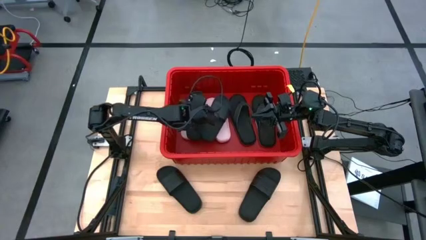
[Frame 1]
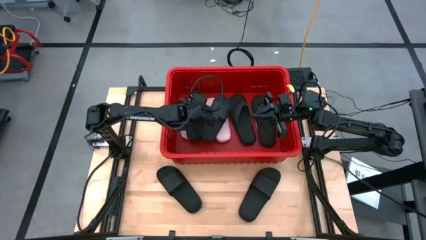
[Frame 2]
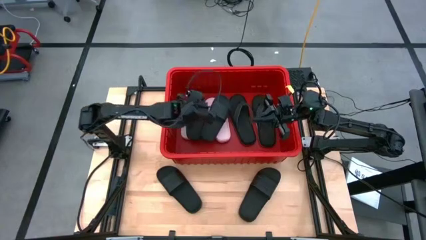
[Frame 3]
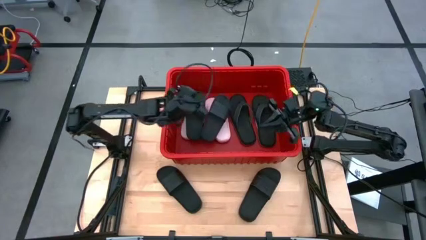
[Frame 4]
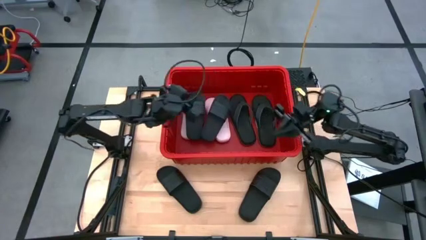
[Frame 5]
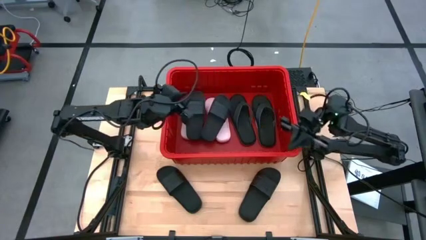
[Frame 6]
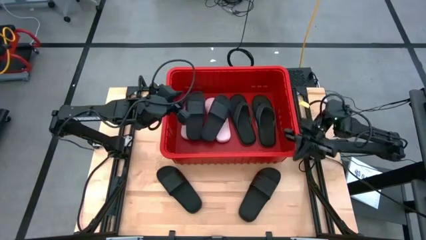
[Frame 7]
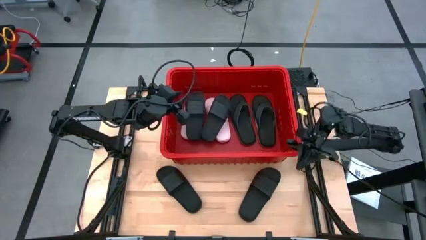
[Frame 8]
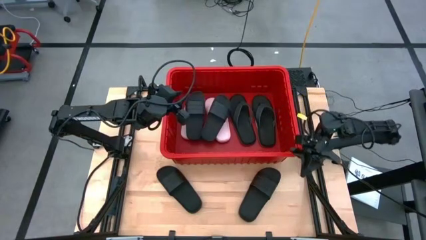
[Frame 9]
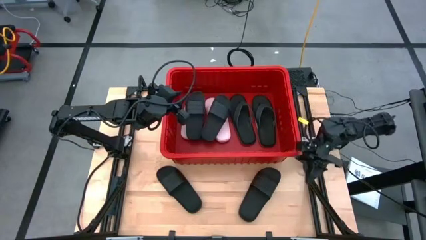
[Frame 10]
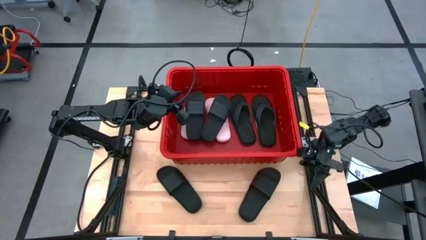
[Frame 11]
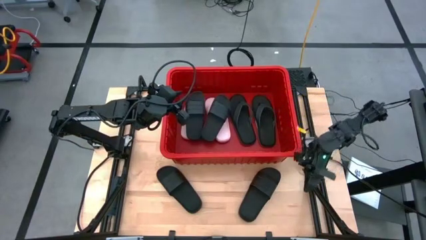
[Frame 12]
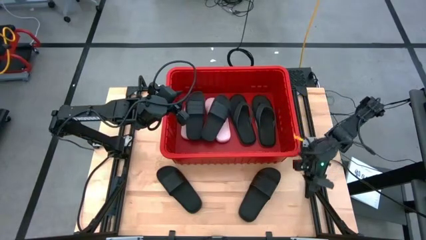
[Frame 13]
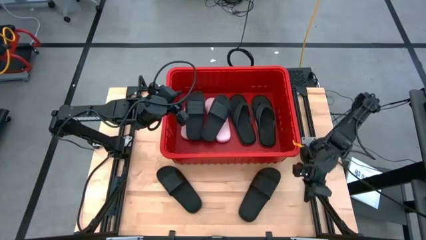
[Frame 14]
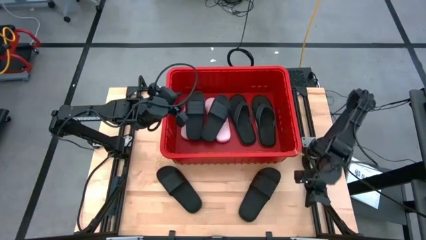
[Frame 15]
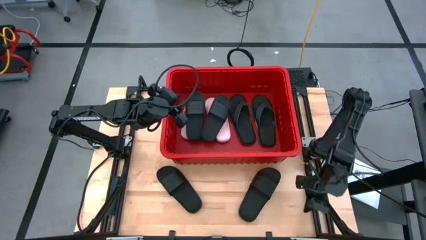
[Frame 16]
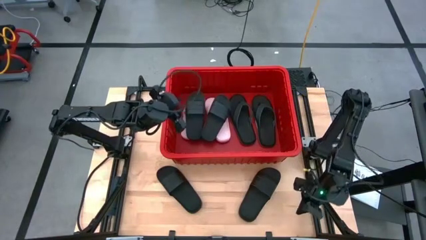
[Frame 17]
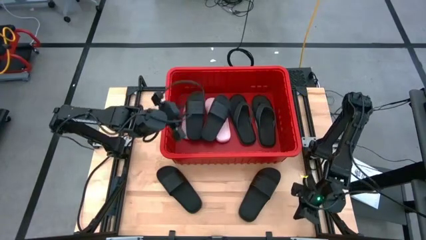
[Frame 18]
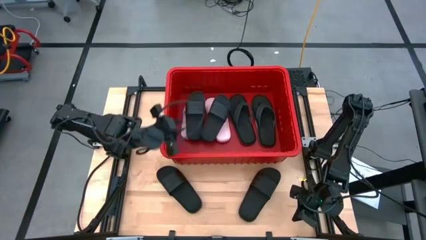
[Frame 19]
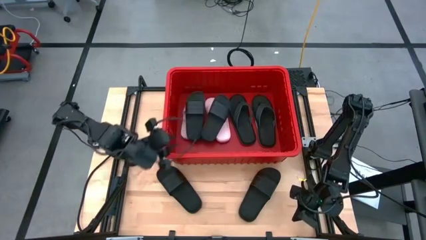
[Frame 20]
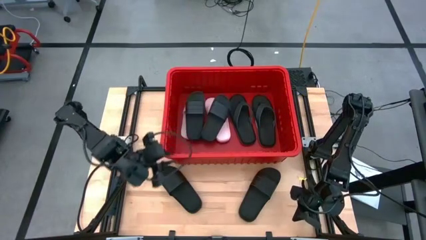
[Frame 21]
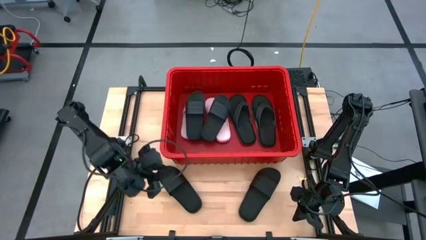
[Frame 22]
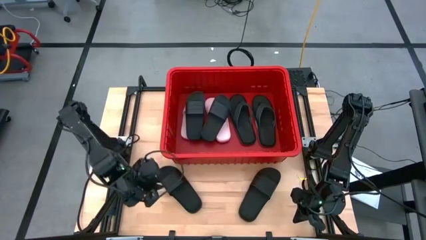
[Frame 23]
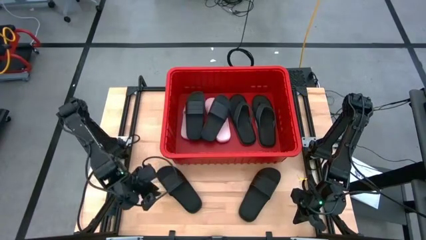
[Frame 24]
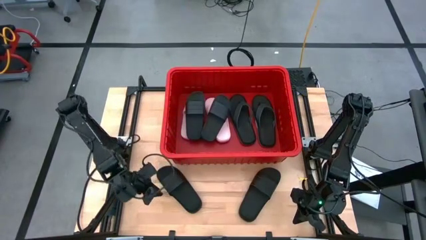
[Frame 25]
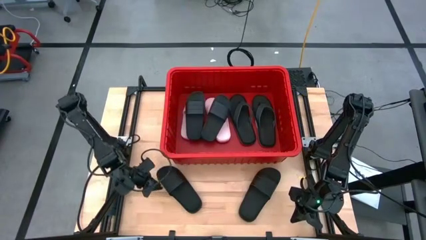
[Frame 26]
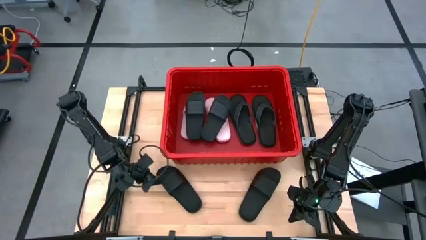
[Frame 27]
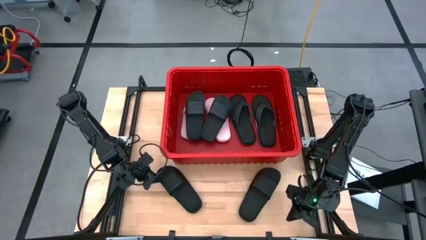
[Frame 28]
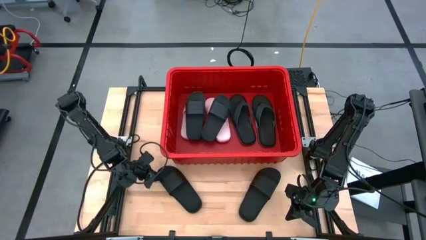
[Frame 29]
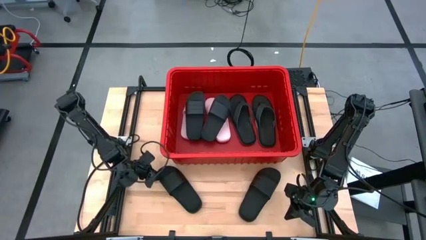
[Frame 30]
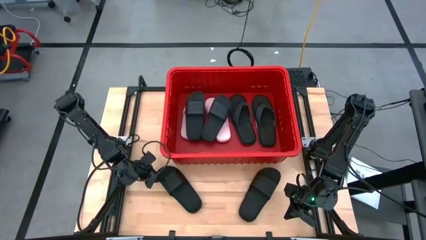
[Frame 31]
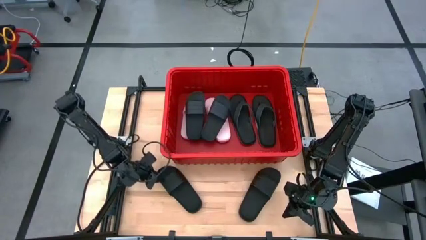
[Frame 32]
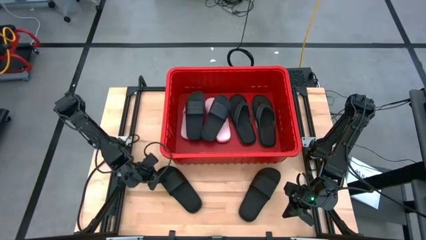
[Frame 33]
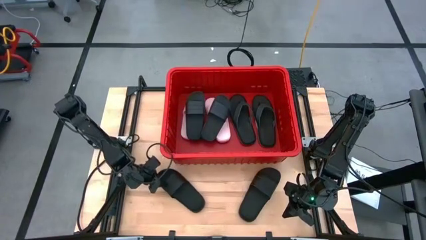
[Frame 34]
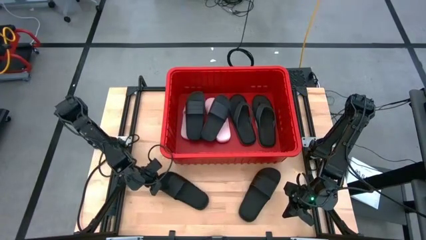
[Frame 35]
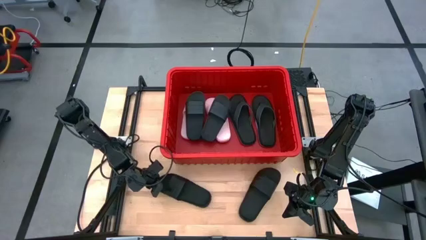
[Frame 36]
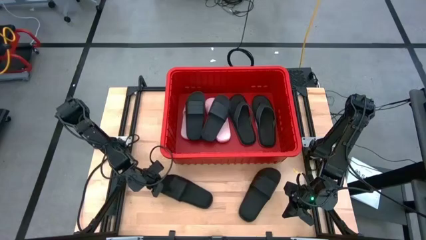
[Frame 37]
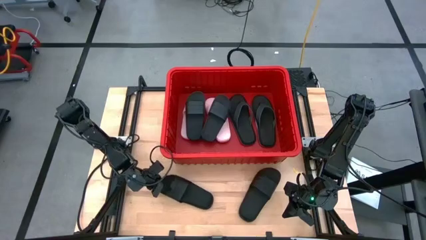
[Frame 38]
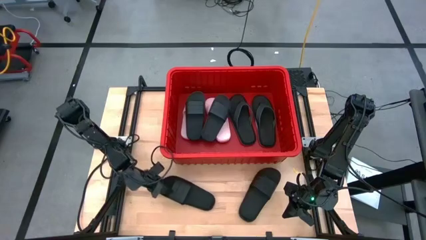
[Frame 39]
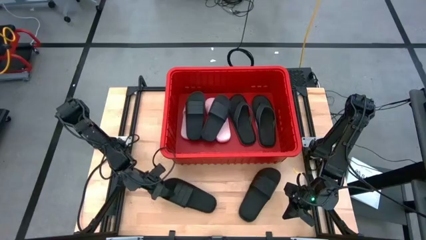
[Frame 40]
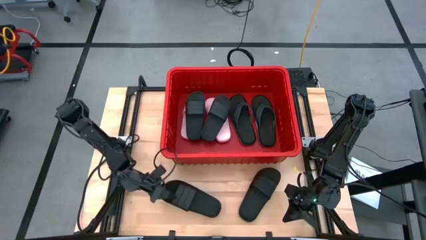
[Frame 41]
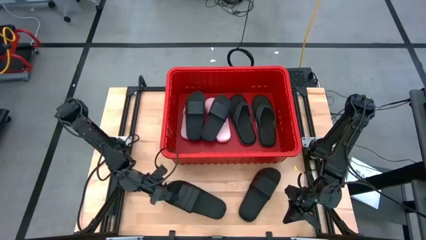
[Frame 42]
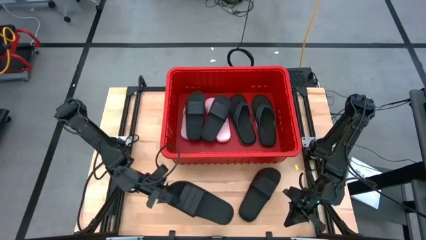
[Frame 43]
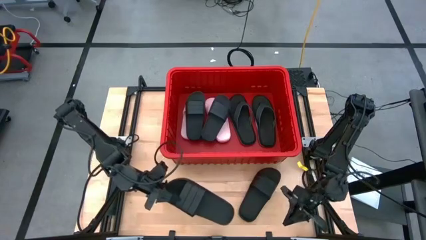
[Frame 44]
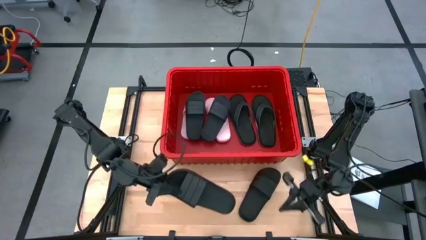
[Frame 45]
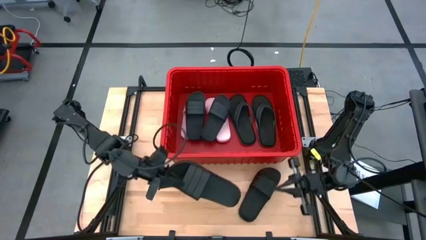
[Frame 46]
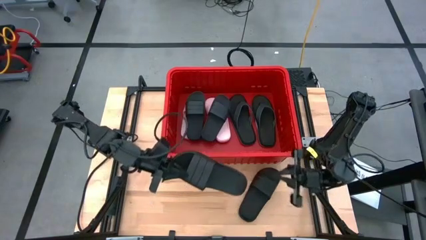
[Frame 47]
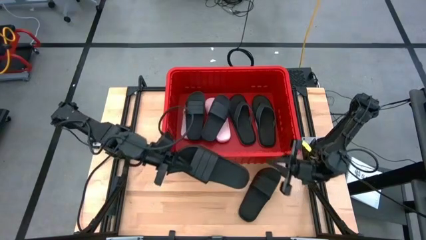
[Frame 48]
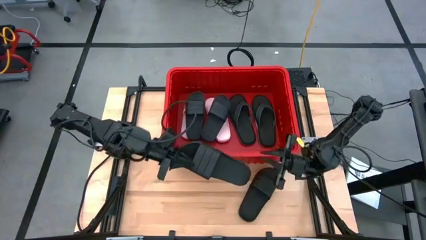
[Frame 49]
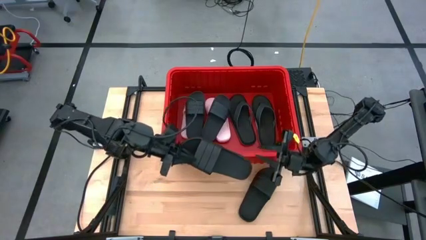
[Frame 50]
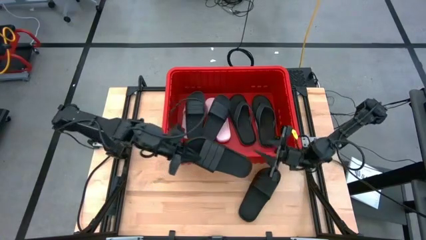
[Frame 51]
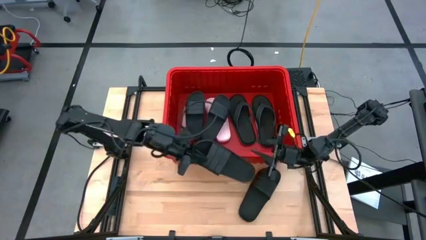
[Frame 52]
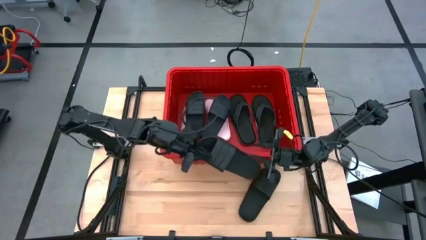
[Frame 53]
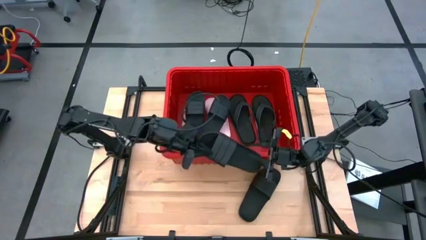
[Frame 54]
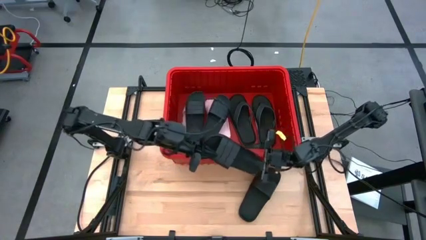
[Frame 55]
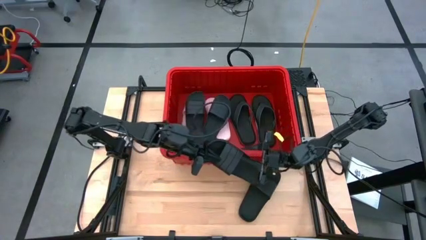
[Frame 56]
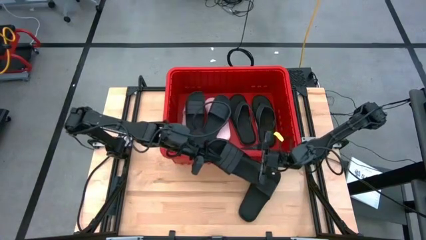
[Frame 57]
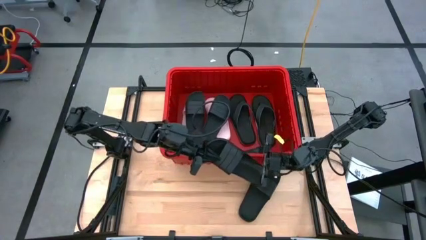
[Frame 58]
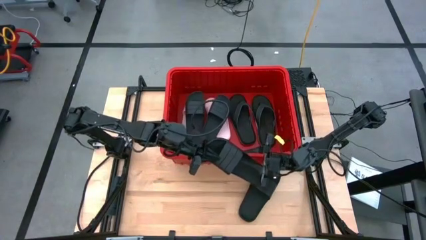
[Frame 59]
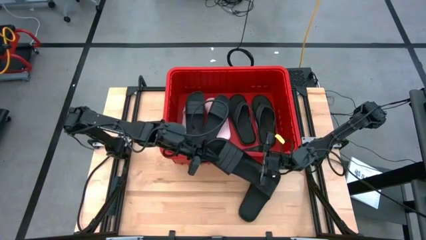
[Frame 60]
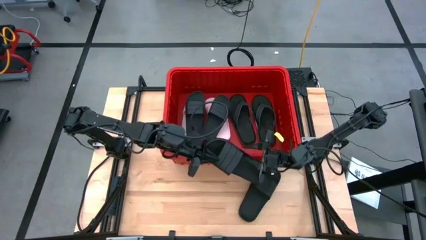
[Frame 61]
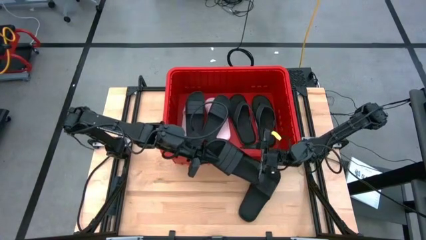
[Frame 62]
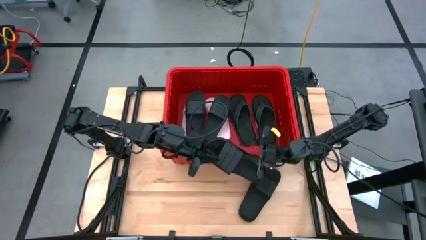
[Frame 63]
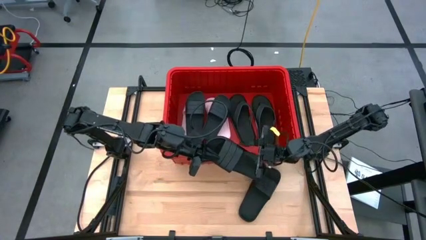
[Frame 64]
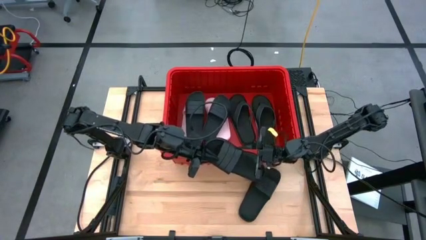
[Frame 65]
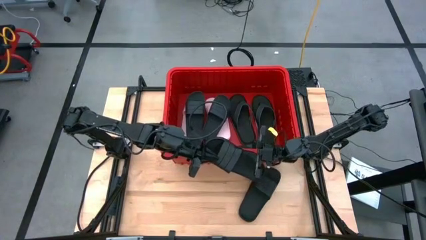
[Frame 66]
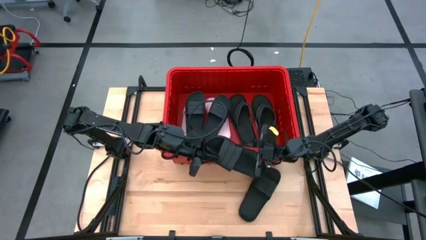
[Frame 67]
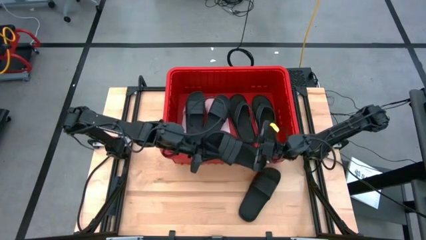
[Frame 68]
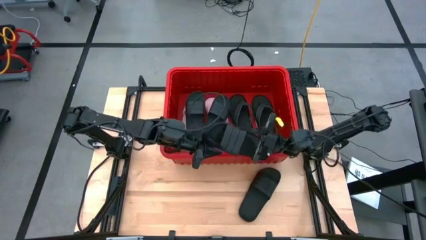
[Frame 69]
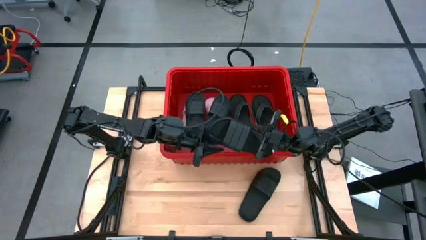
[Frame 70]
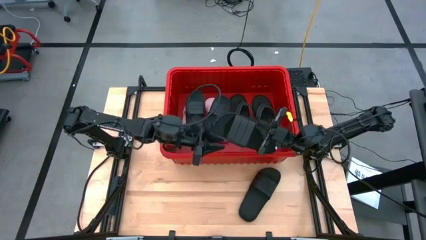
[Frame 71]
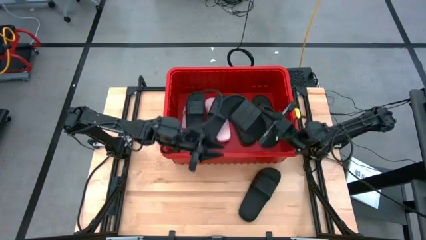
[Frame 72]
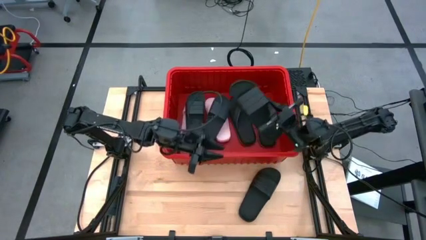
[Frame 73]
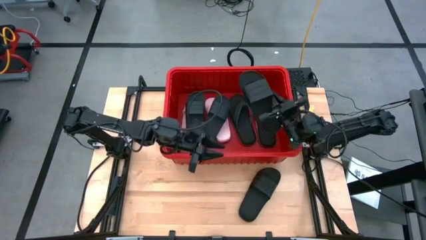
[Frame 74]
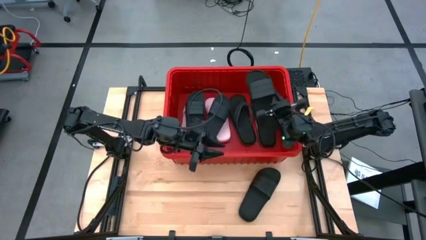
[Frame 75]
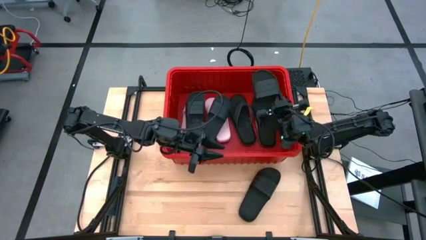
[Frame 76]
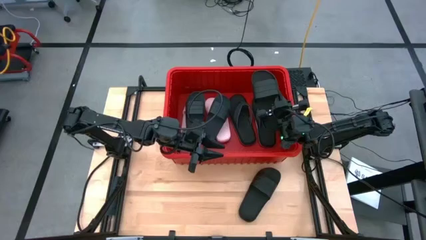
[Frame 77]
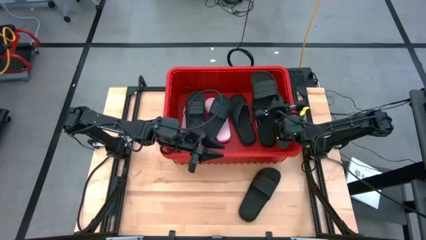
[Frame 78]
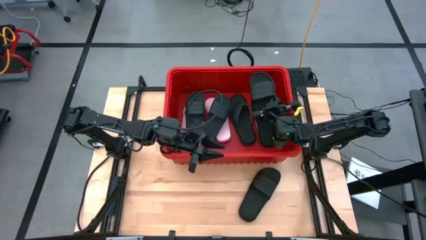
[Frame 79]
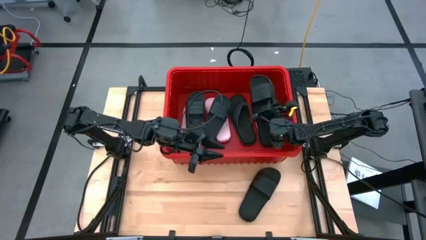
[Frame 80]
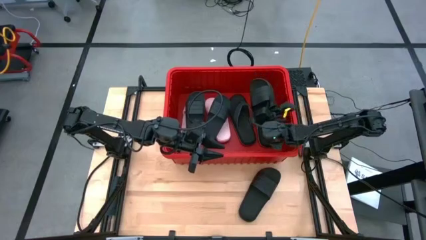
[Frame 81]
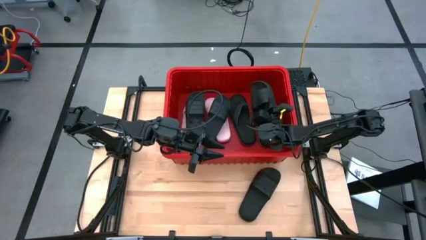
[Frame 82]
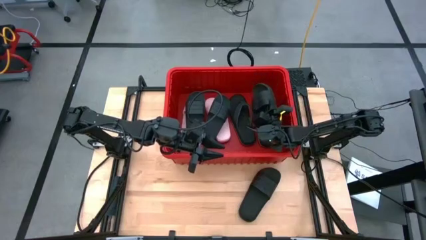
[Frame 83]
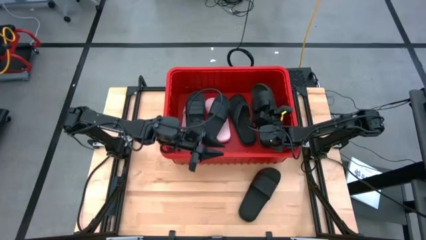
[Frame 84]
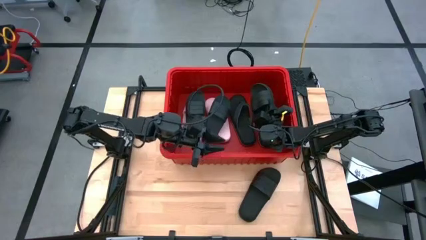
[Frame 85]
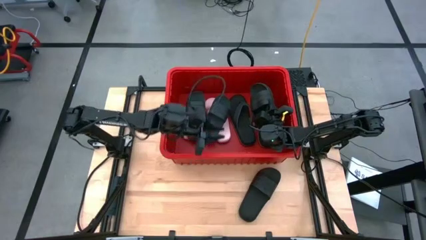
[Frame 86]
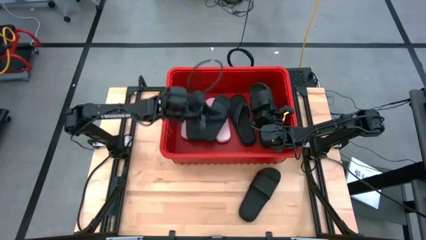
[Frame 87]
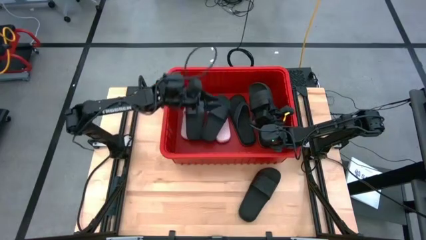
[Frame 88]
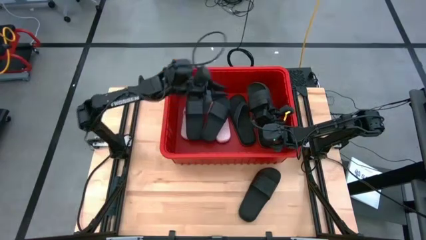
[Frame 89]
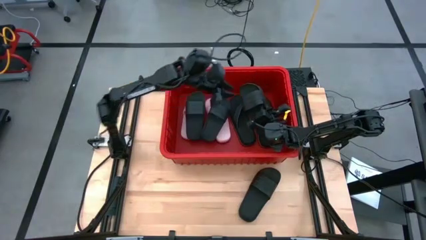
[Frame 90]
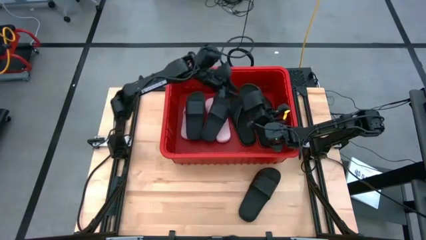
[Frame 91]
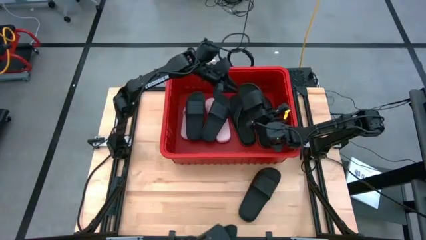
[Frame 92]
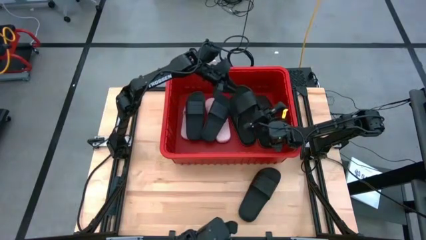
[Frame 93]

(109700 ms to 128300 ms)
Task: Pick and place slides into bin
Put the black slipper into the red bin
